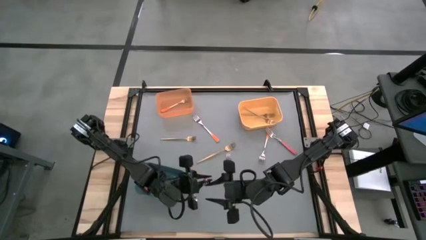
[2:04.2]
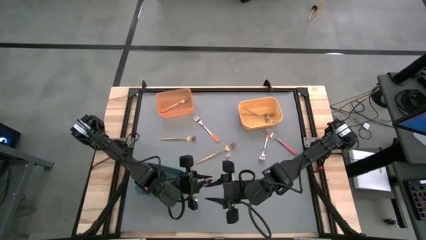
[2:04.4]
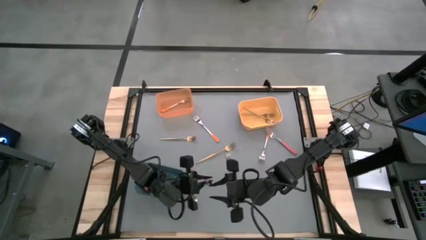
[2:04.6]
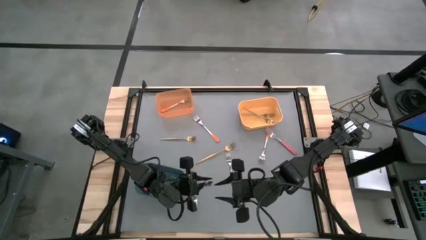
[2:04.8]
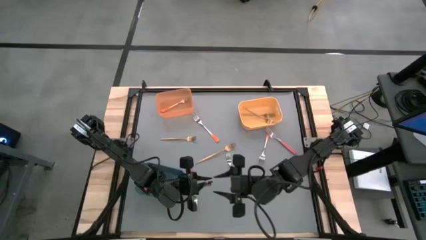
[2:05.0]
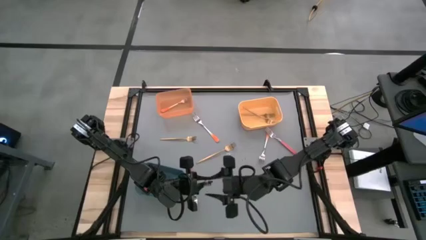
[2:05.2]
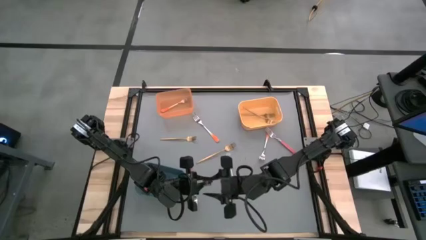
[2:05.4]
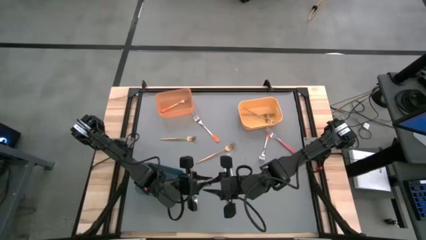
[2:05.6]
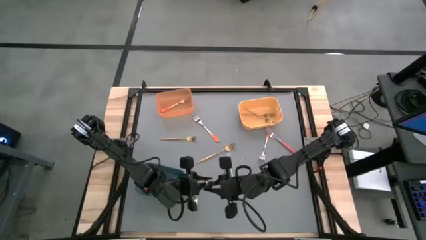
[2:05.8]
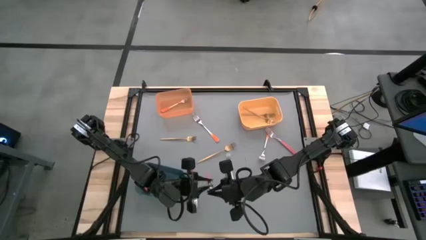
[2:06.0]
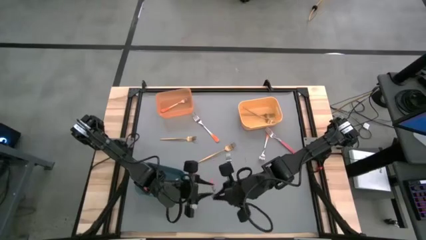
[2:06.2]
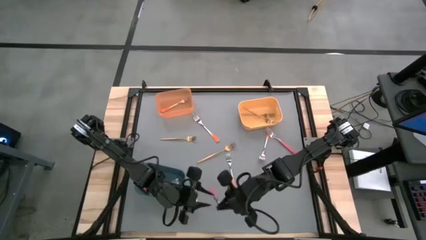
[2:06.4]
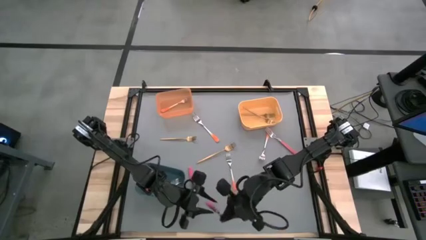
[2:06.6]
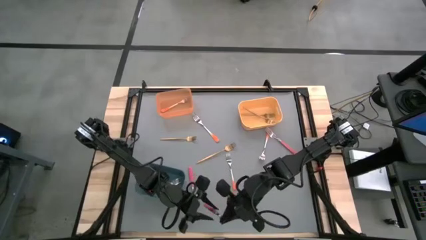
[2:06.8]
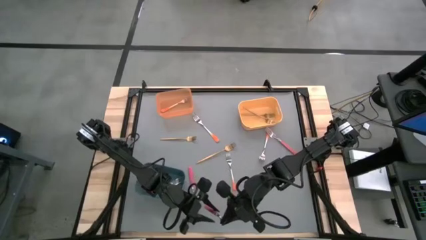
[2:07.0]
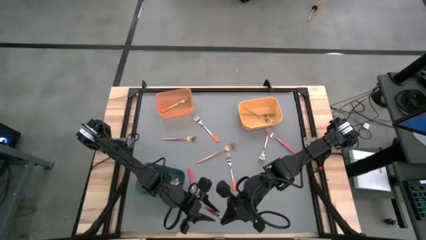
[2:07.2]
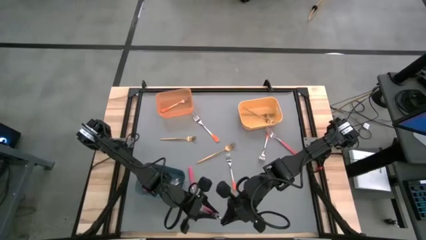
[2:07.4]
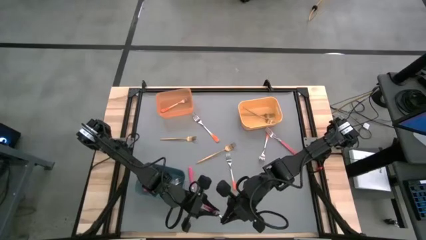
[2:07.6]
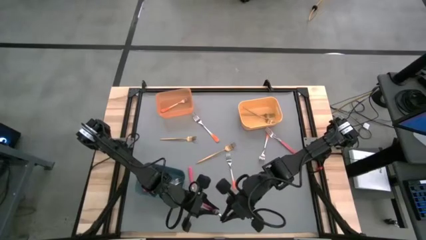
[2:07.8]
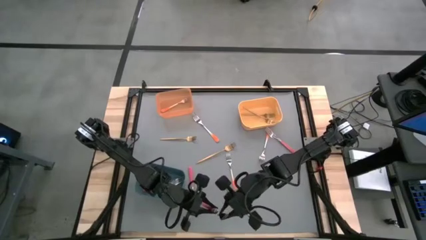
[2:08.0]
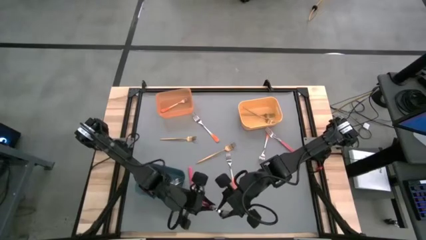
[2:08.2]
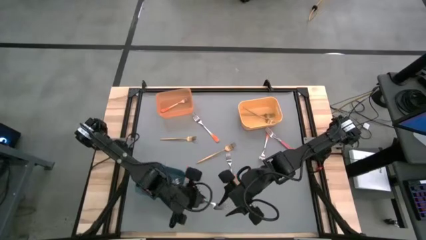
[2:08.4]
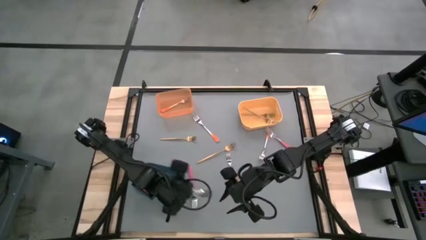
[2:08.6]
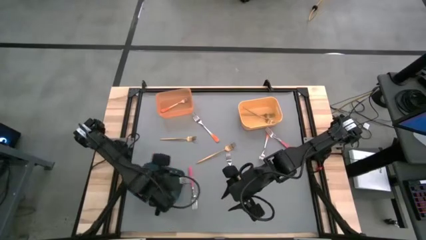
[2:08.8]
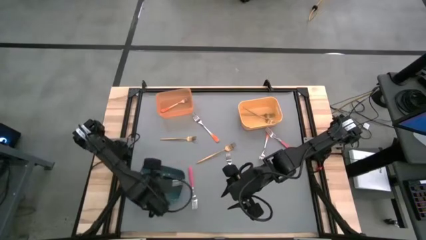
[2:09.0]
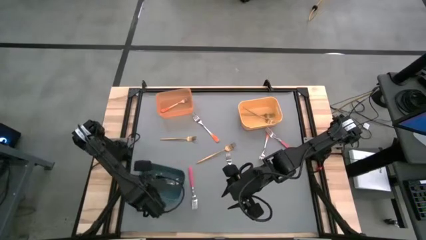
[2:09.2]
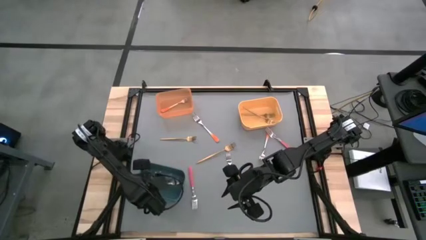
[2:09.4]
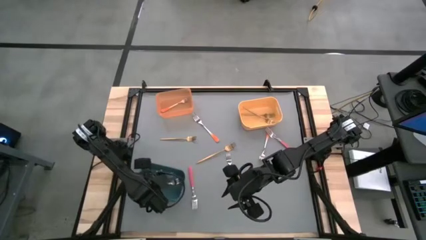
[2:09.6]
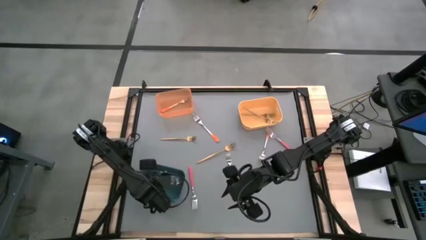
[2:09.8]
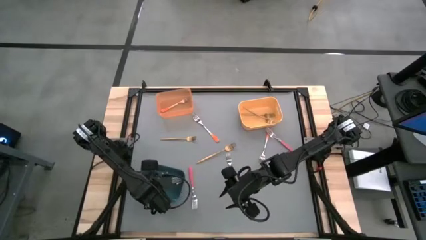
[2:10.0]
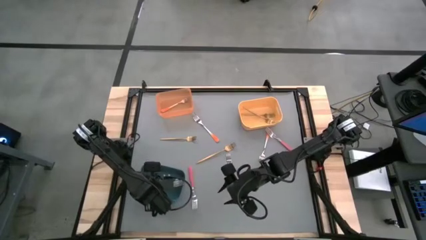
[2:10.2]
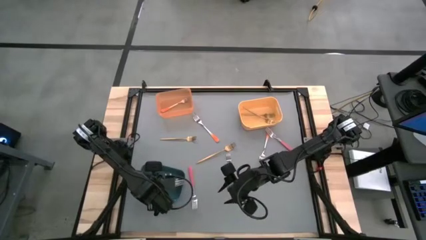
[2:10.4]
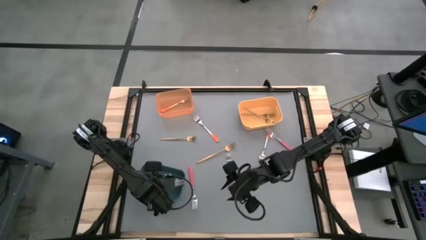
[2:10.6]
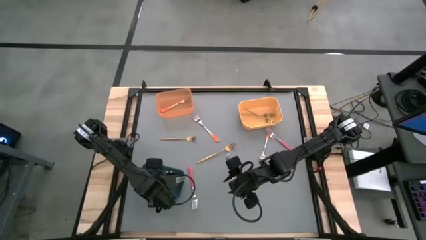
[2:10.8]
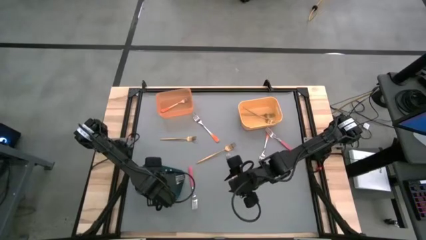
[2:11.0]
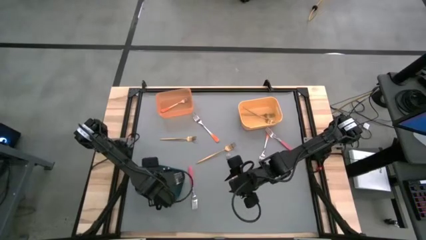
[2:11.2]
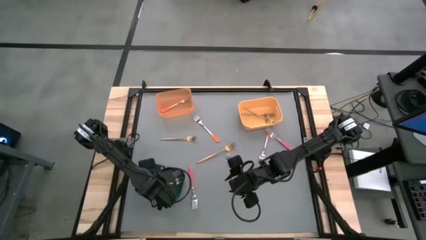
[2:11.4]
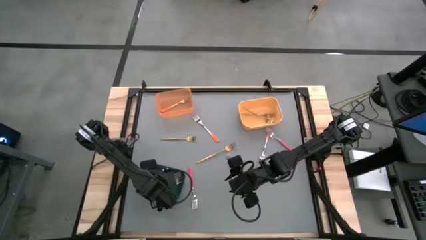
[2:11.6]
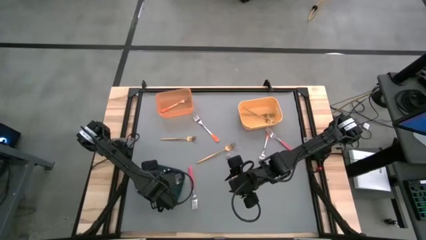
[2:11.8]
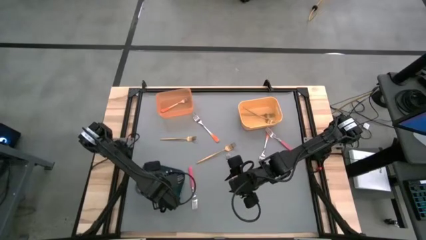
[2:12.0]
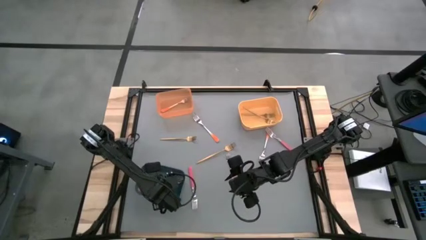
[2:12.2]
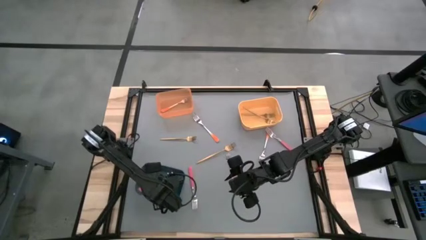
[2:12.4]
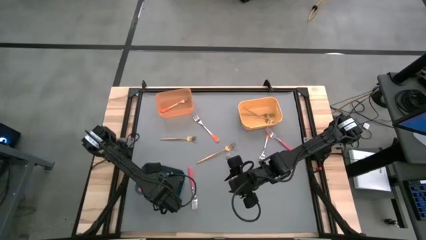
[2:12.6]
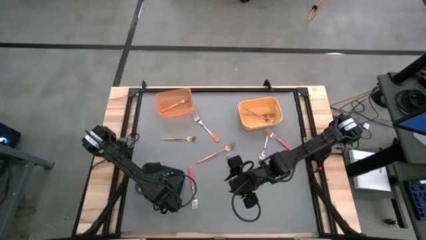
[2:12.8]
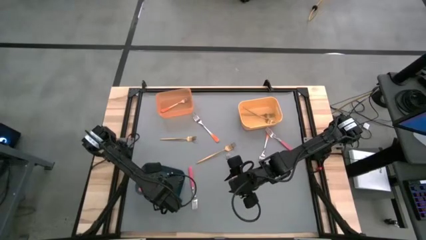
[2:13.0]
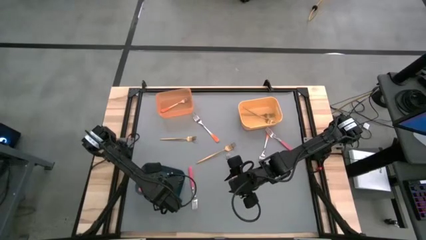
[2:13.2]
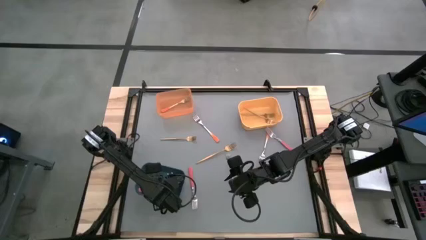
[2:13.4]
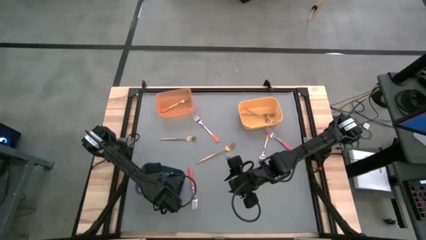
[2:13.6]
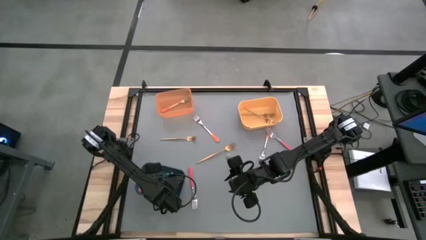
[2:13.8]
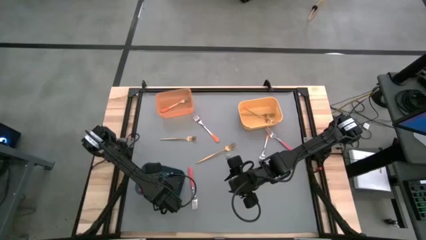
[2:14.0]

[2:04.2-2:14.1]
Task: Sort silverware by color (type)
Put the pink fork into the blue bin
